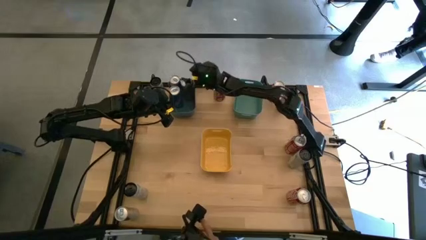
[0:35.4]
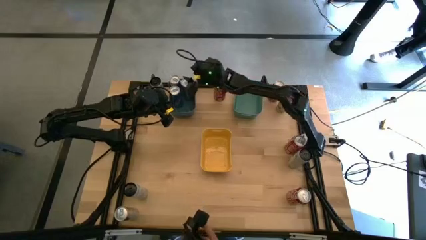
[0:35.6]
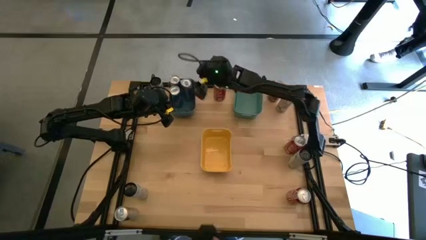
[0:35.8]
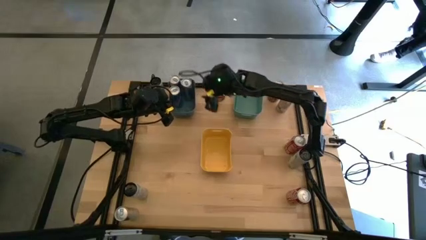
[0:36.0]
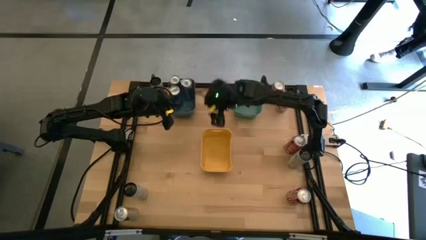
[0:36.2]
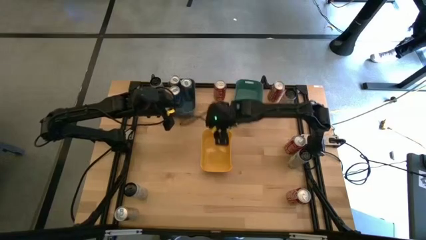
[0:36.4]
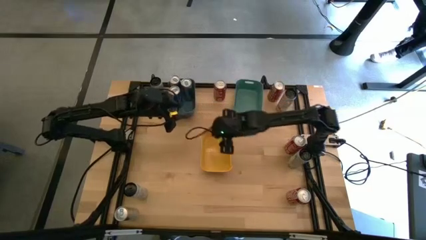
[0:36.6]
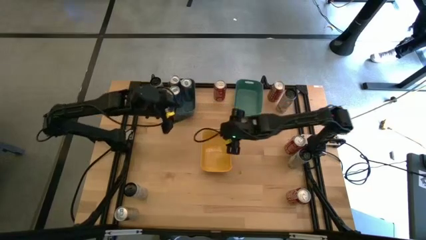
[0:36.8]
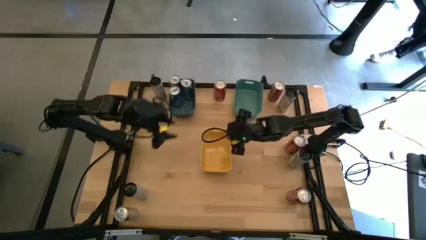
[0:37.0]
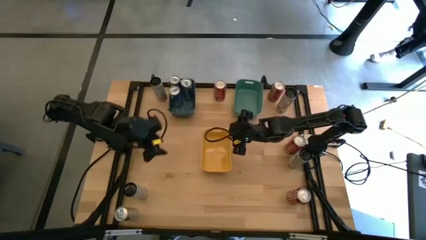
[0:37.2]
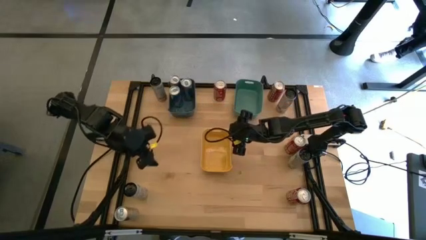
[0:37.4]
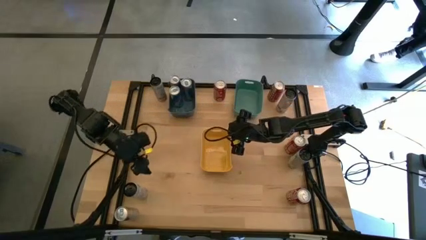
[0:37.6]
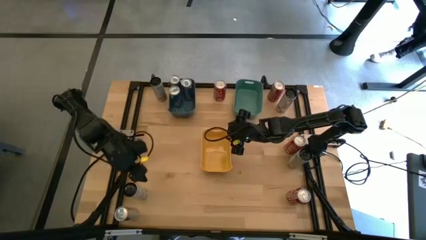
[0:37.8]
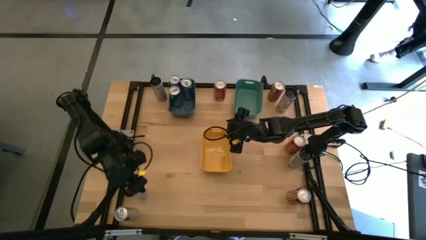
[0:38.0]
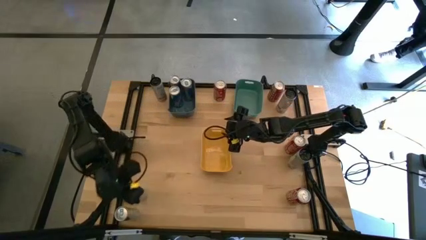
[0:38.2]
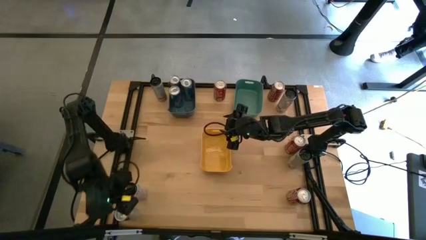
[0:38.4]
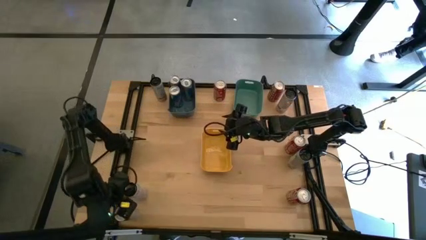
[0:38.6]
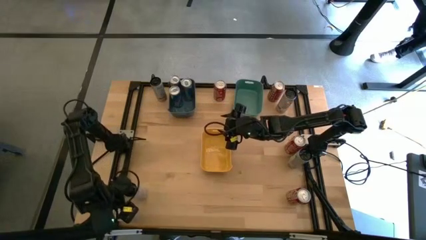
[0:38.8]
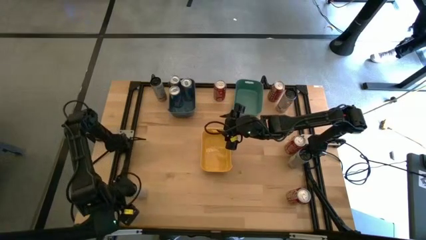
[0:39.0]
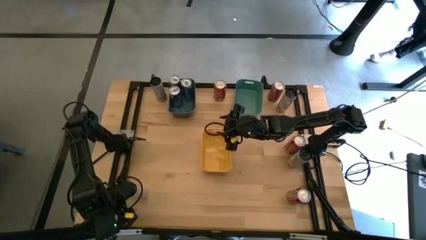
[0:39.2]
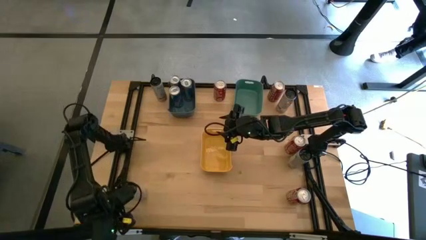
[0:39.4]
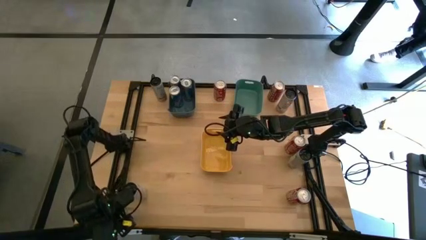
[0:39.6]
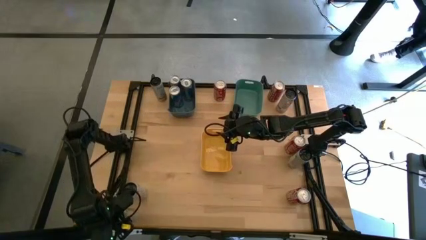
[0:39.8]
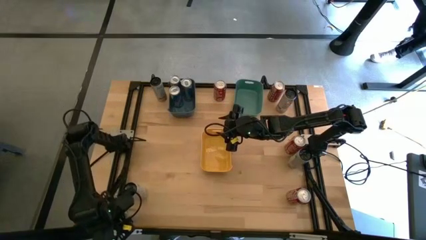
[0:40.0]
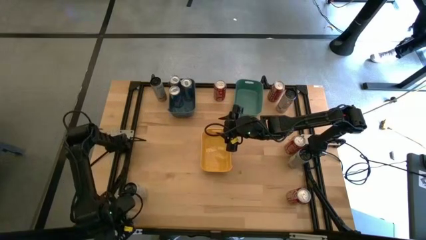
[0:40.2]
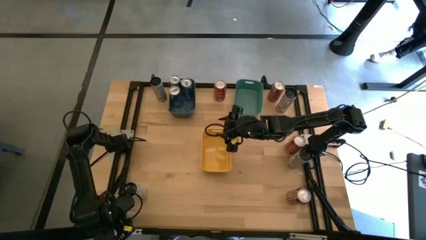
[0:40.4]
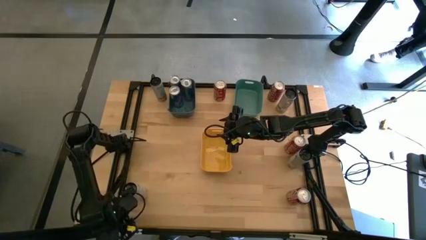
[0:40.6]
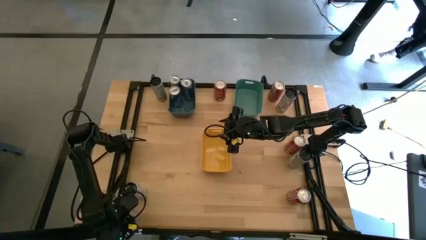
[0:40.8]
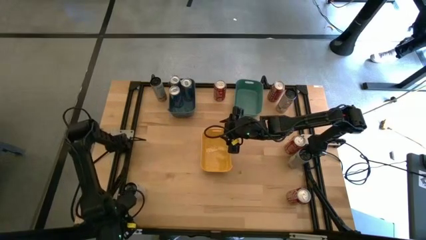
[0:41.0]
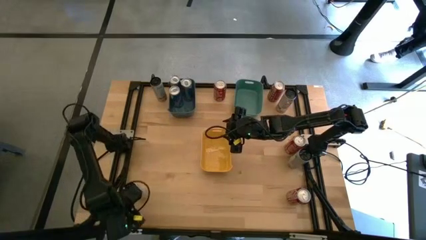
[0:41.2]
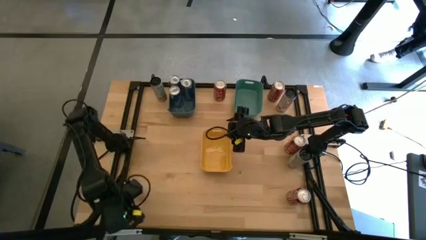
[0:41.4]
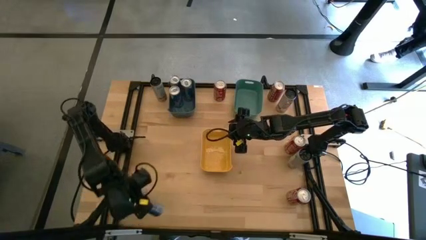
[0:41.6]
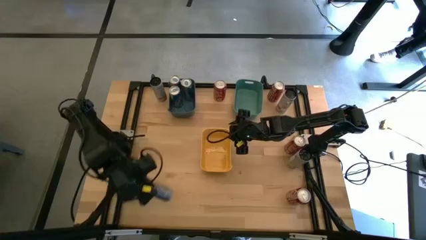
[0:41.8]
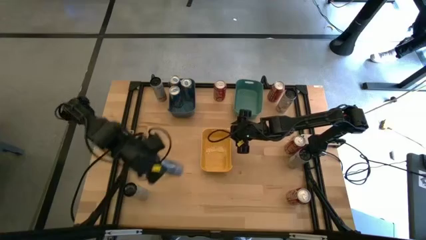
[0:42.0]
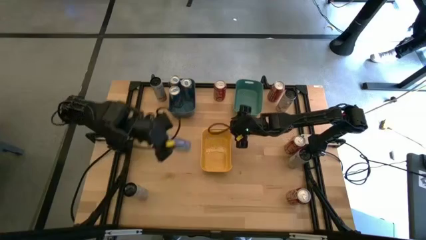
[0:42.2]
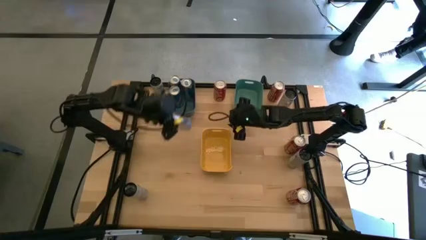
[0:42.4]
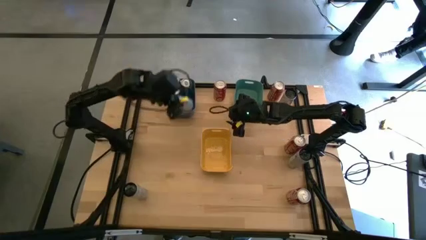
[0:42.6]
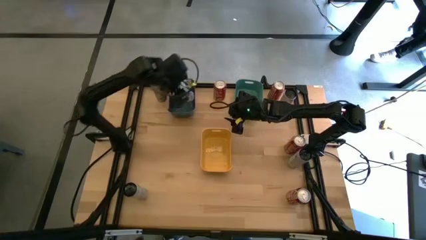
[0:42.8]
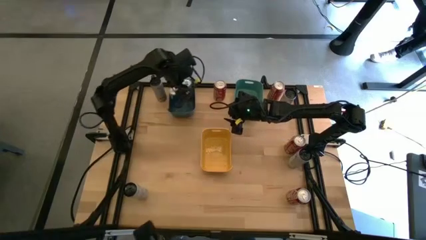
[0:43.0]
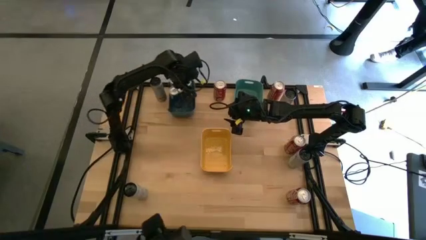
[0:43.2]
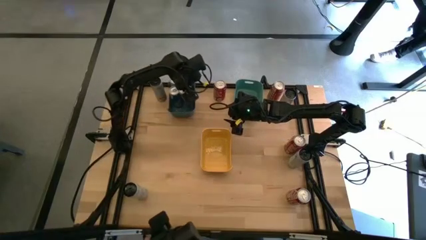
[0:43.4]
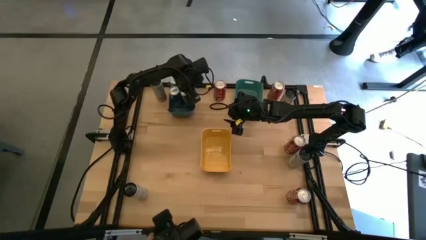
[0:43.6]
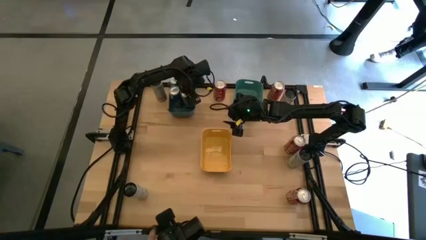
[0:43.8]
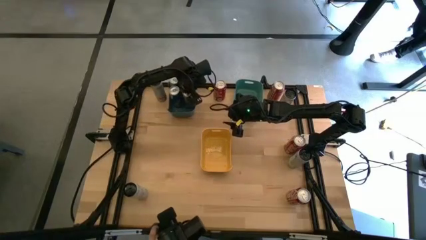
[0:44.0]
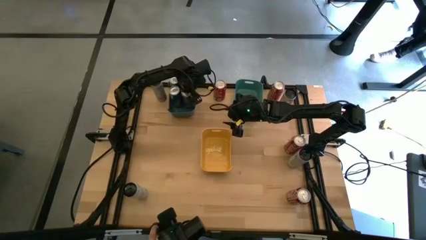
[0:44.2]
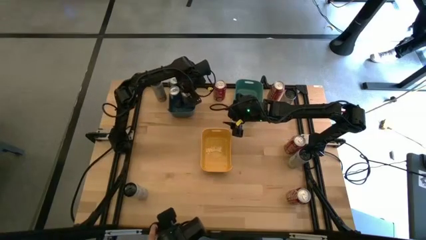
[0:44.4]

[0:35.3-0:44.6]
Task: Sort soda cans
Put the blue soda can into the blue bin

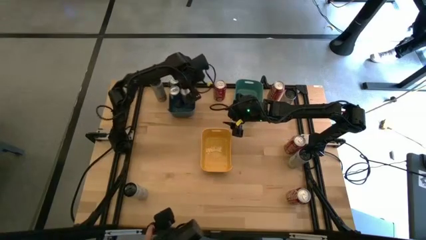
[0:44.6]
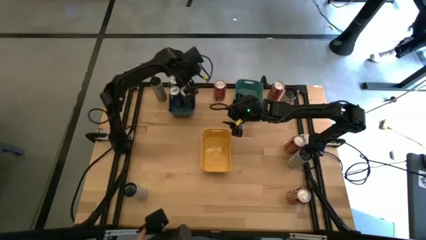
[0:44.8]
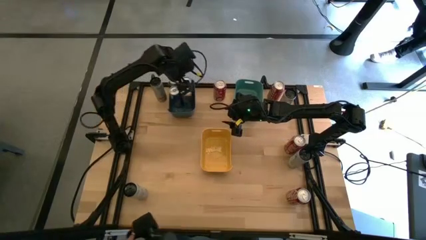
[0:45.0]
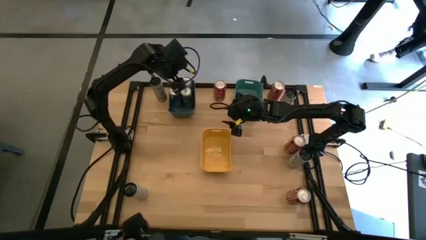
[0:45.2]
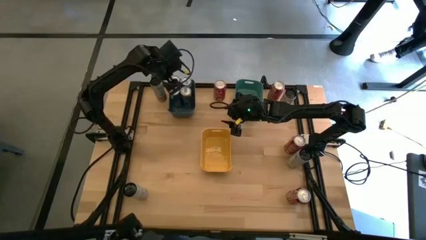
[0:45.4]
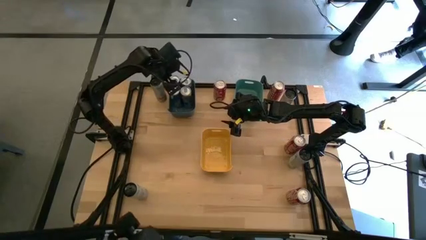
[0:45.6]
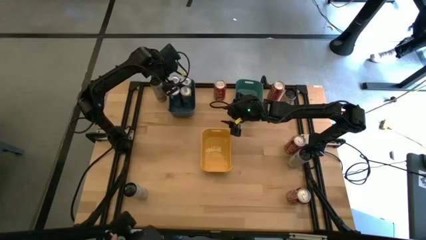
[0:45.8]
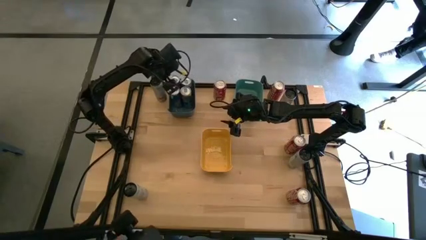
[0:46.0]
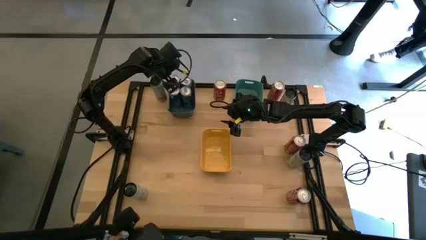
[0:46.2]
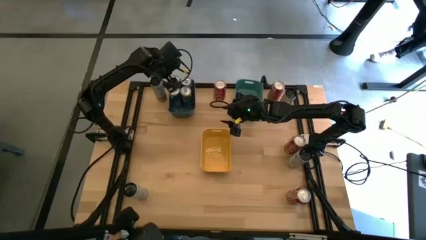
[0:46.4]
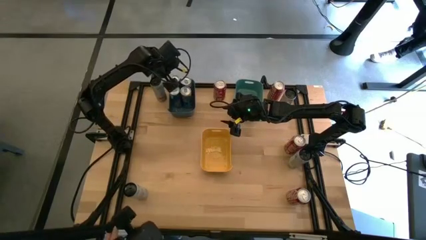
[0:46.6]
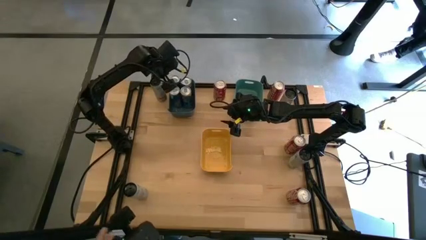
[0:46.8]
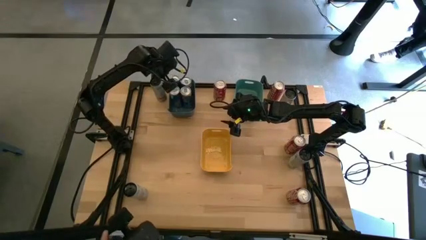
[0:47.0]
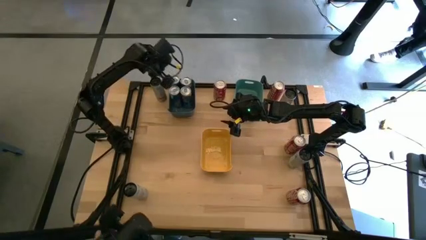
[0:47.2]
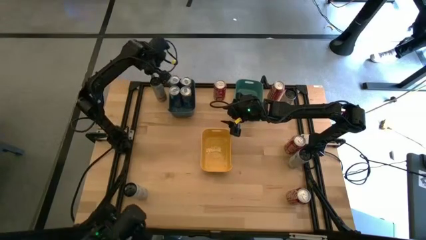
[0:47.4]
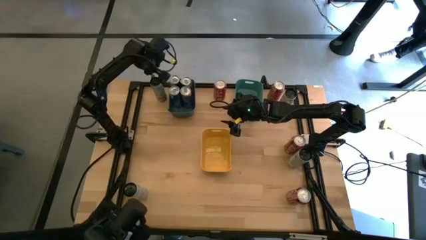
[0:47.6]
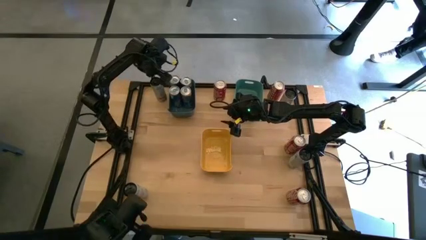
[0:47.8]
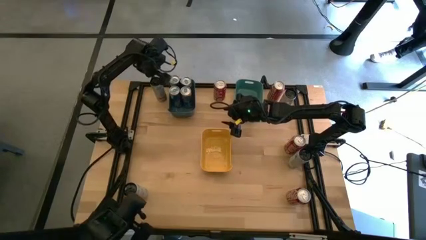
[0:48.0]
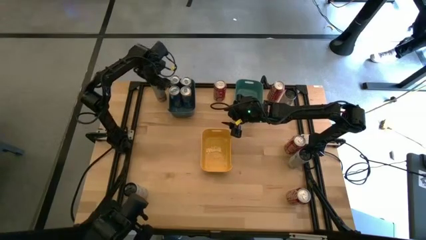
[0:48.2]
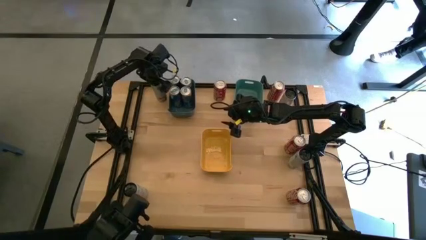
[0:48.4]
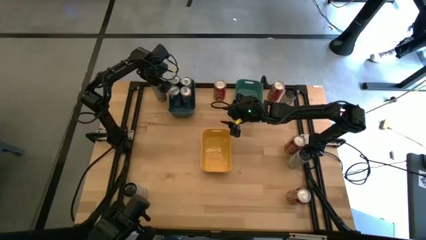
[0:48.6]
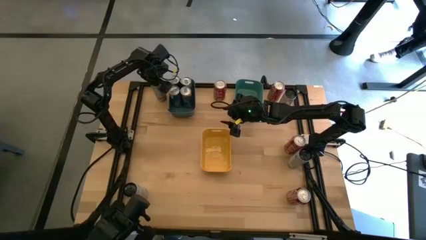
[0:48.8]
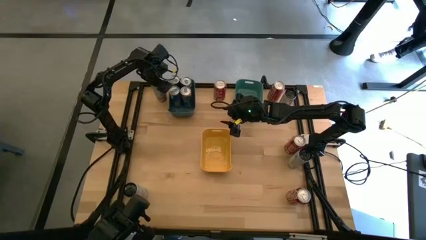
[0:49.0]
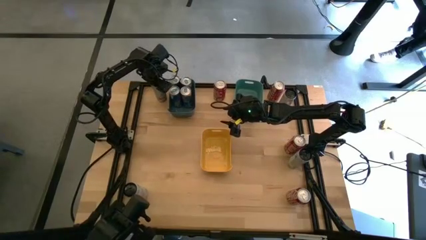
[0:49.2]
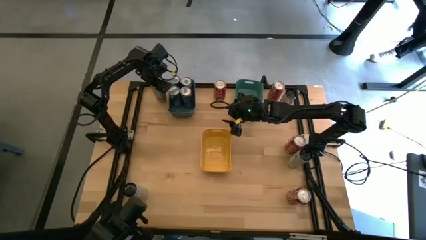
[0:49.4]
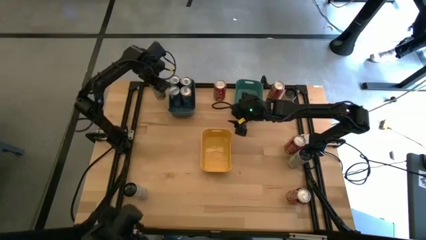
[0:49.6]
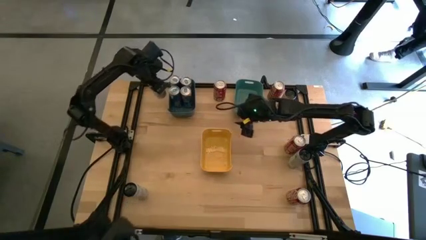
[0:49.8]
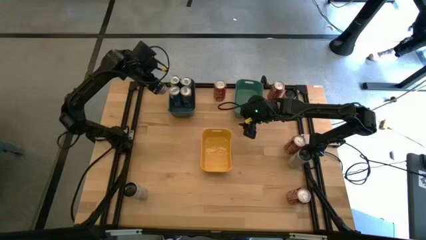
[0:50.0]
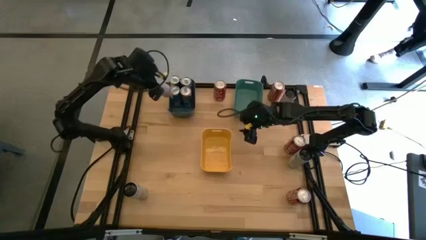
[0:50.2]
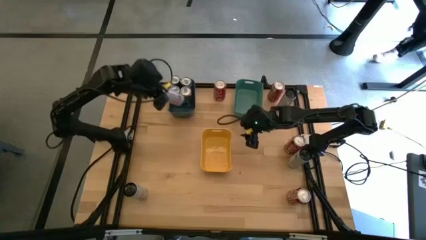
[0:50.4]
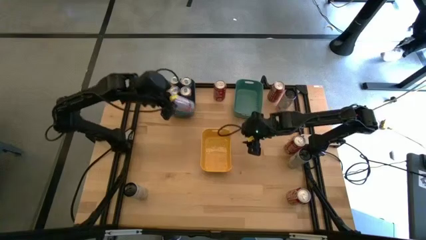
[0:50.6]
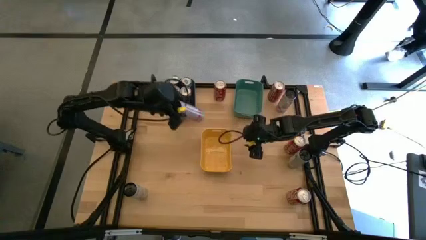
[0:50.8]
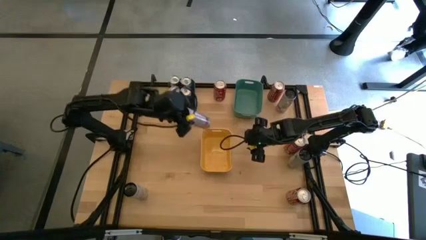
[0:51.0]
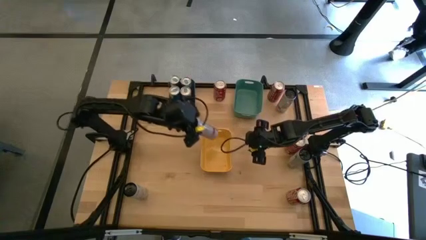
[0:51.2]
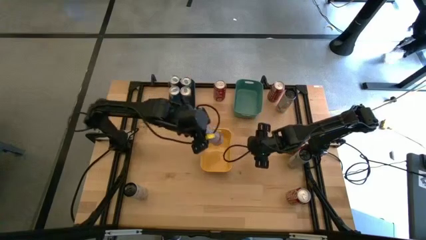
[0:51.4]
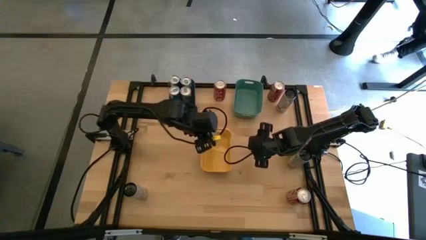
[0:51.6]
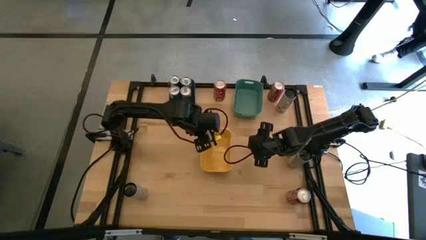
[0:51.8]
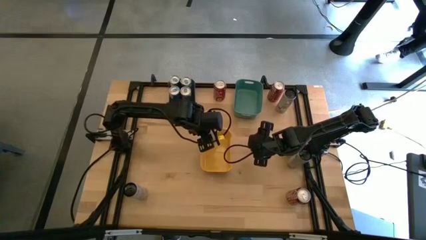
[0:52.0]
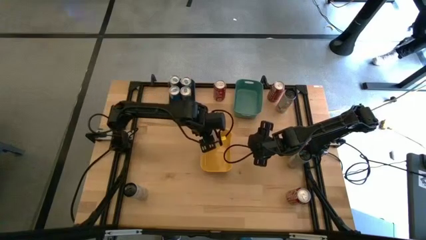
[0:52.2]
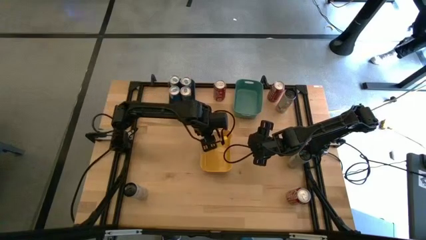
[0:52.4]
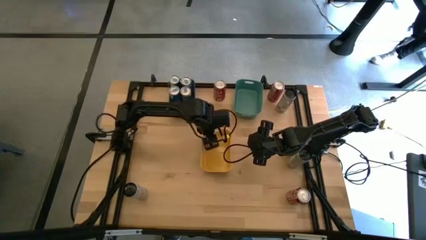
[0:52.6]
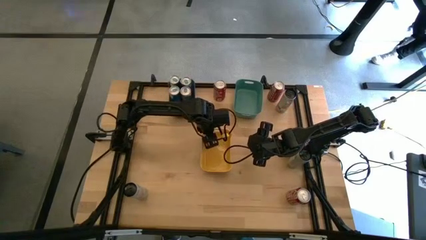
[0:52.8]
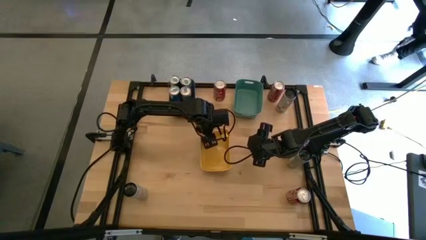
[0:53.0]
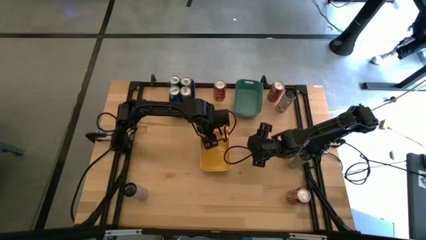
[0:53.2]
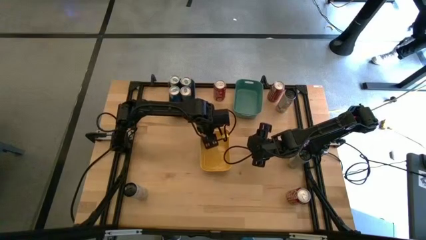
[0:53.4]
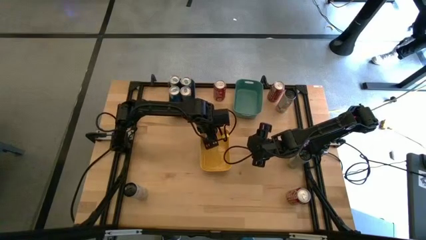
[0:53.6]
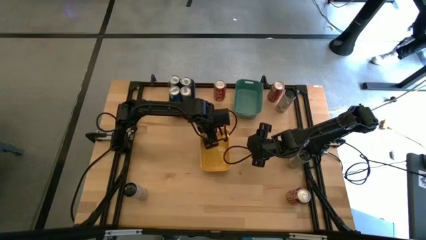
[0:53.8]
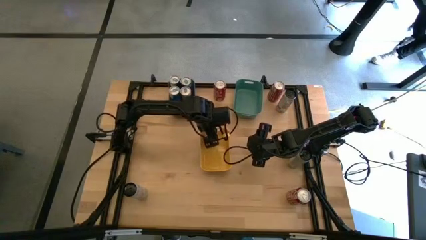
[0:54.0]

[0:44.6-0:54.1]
Put the top left white pink soda can into the yellow bin
